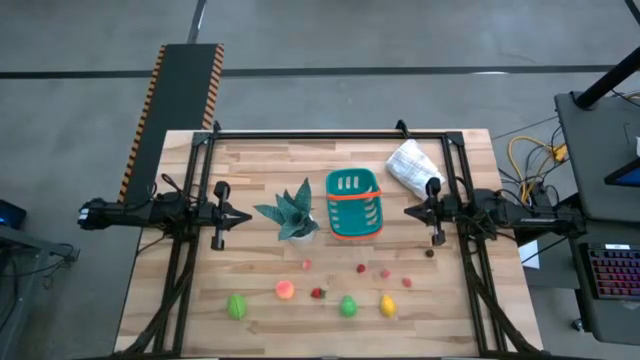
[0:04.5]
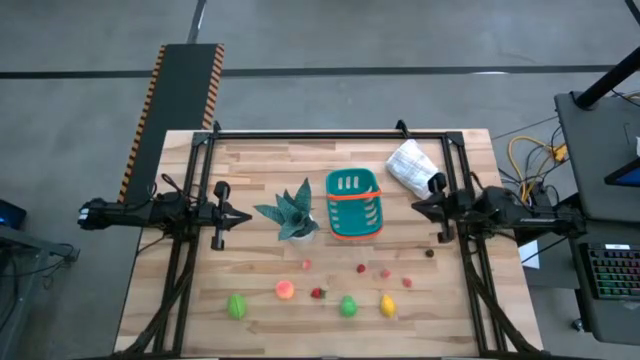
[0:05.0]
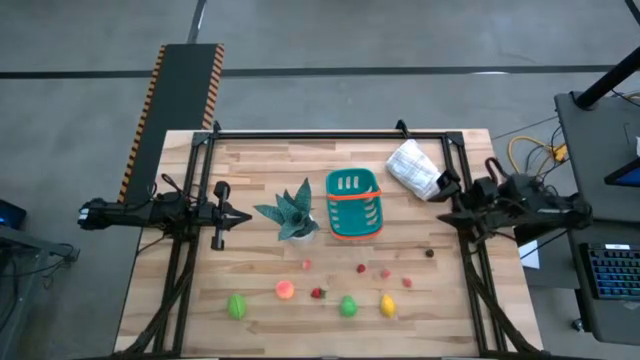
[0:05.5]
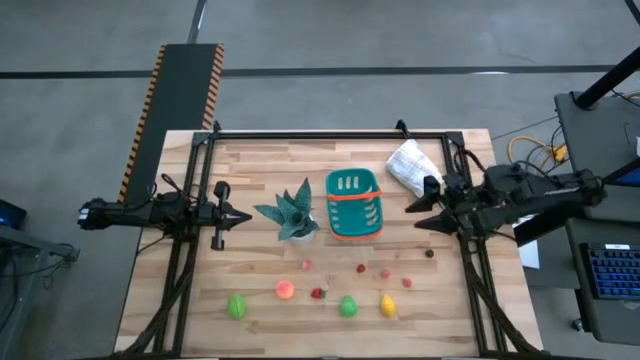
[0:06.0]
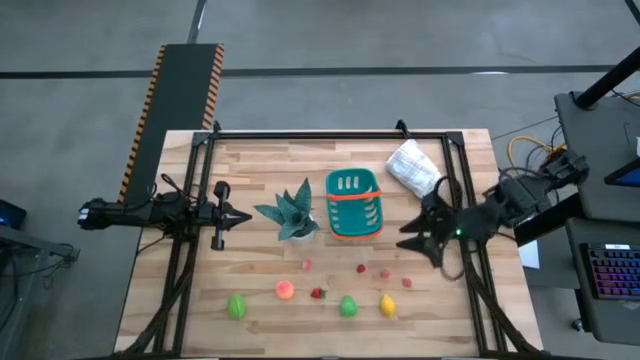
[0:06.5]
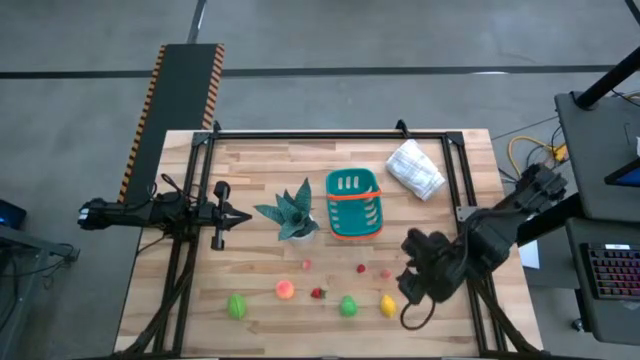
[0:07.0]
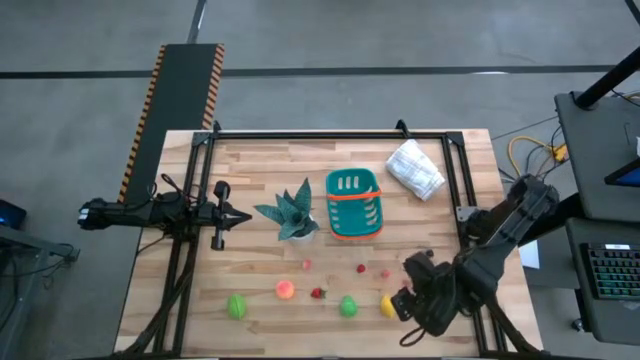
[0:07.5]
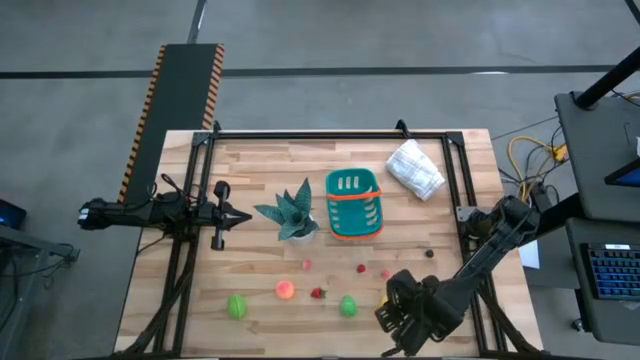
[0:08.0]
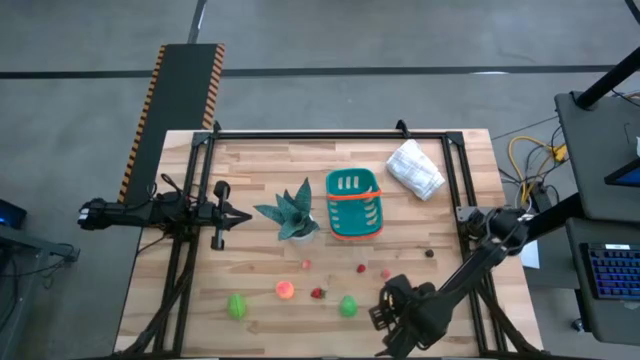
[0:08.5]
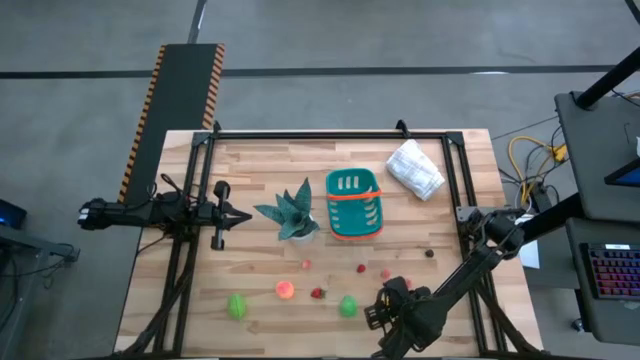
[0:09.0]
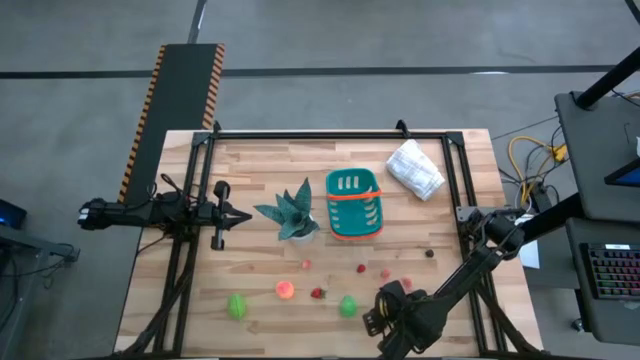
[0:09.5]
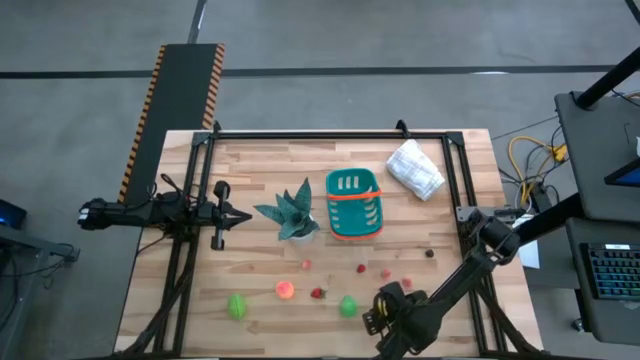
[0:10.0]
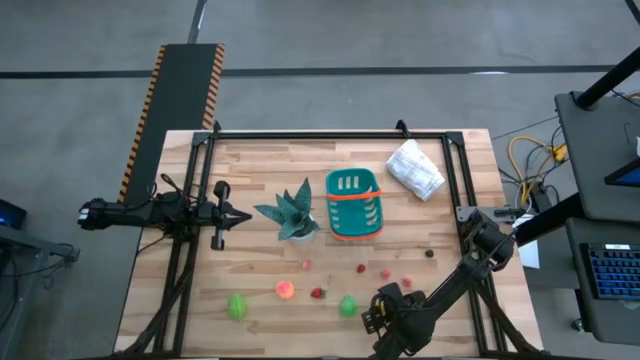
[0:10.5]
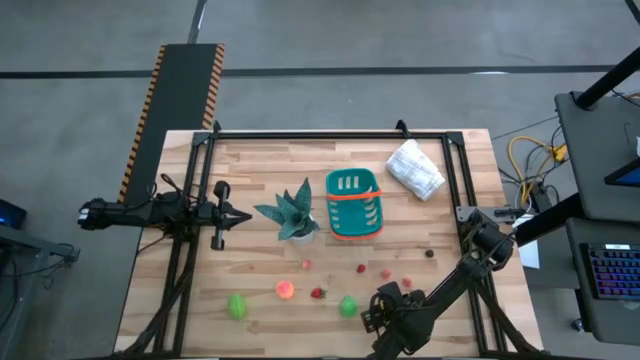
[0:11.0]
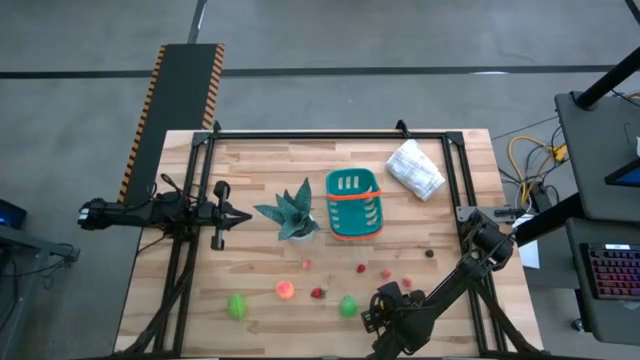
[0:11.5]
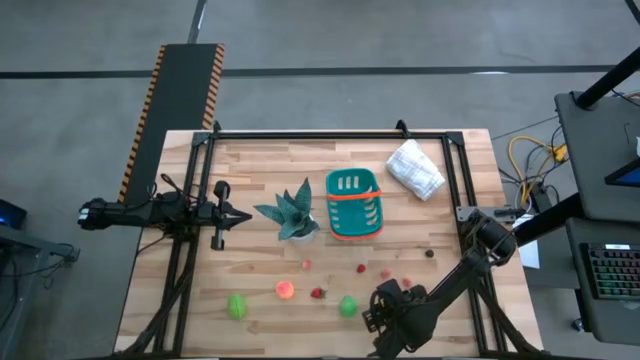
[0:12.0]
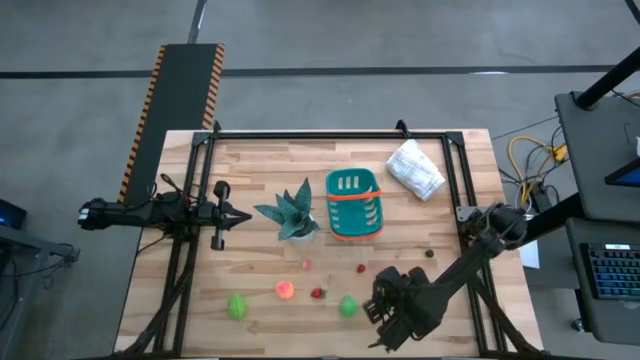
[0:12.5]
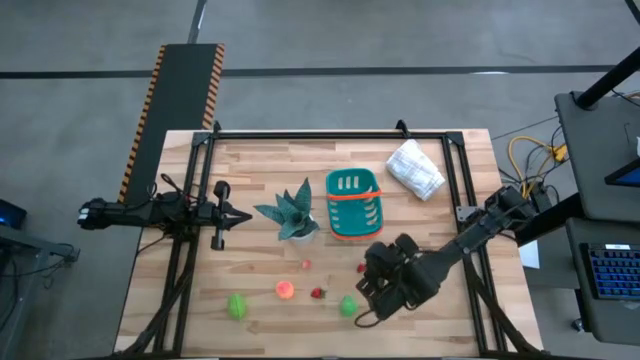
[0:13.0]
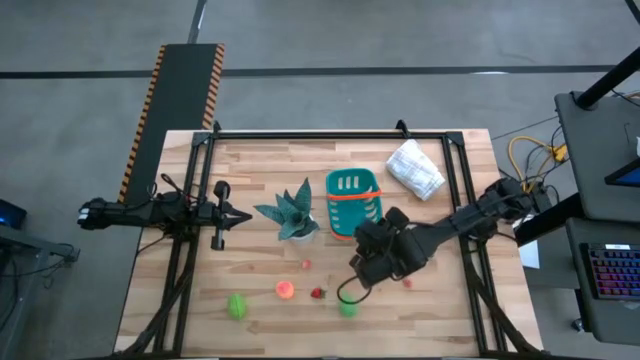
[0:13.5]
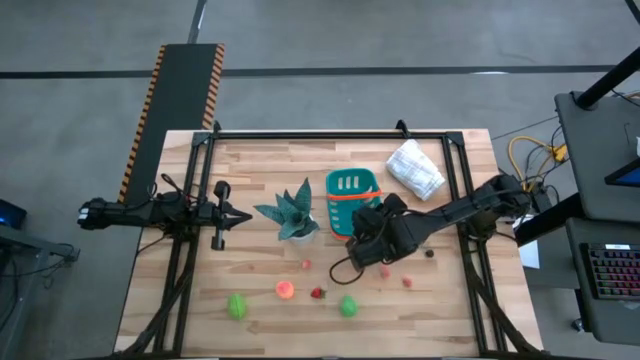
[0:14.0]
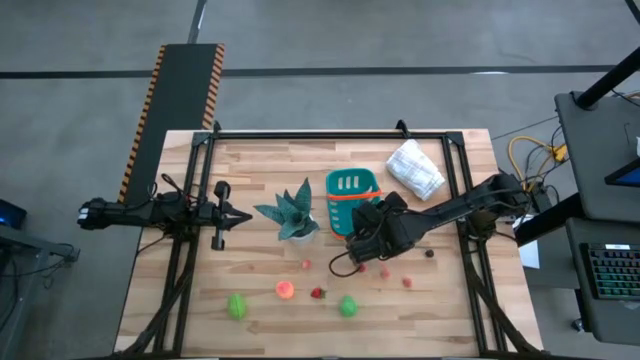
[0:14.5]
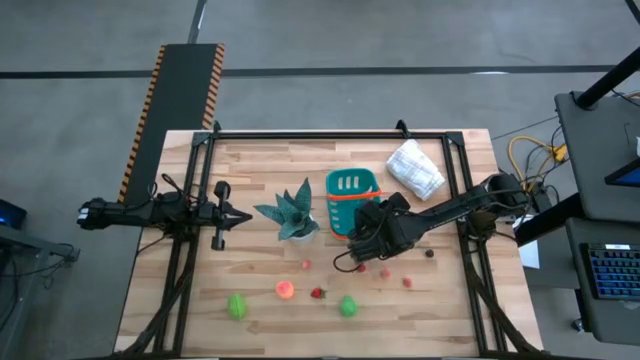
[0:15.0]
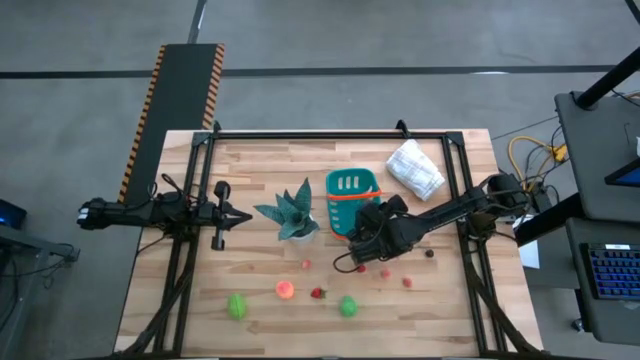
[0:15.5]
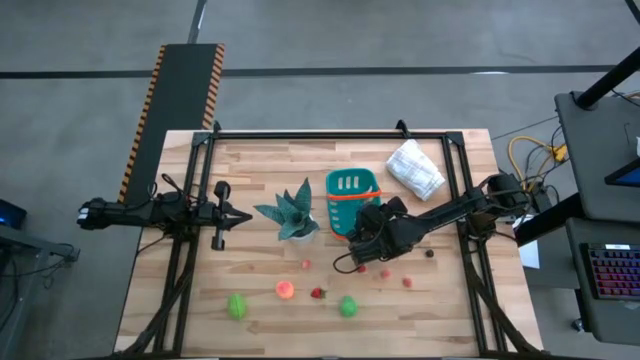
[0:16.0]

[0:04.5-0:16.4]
Task: Build produce basket
Put the lemon into the basket

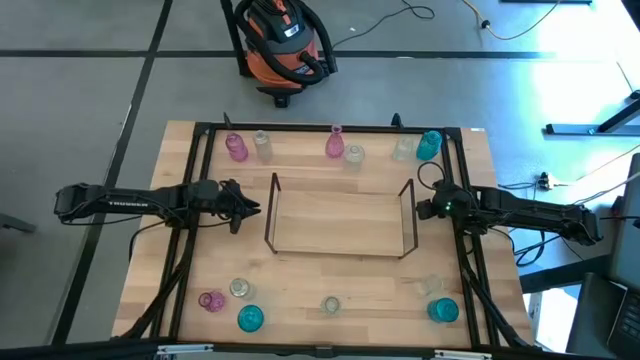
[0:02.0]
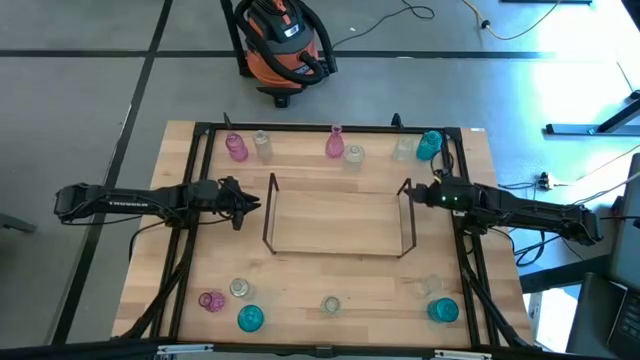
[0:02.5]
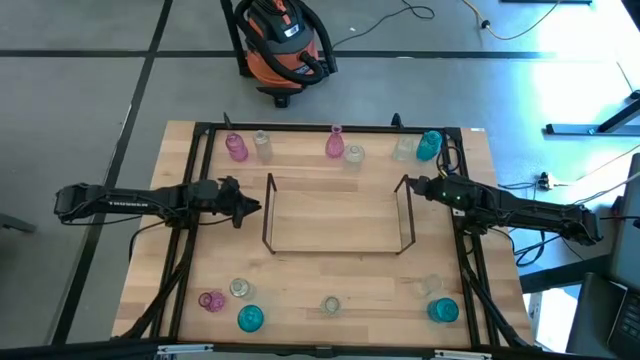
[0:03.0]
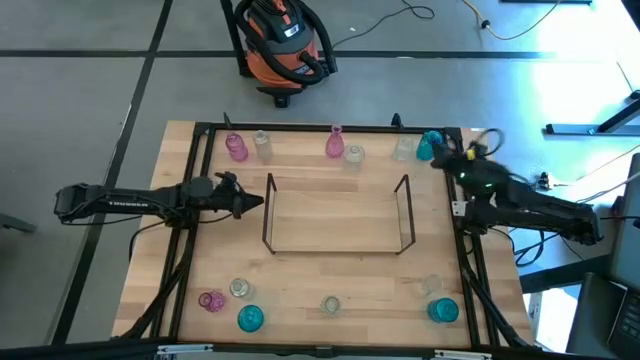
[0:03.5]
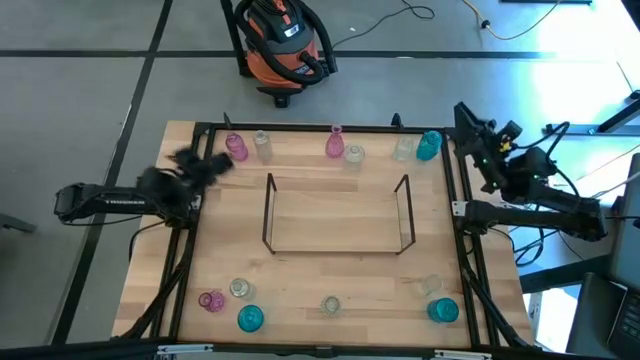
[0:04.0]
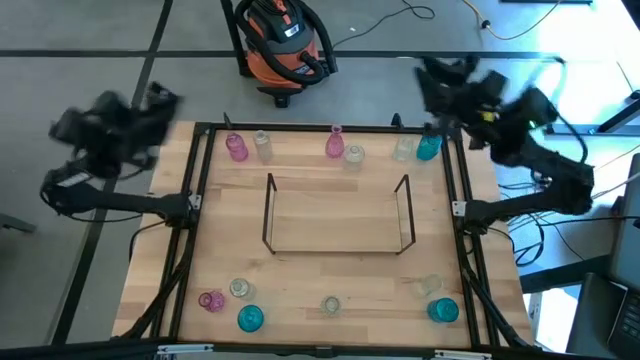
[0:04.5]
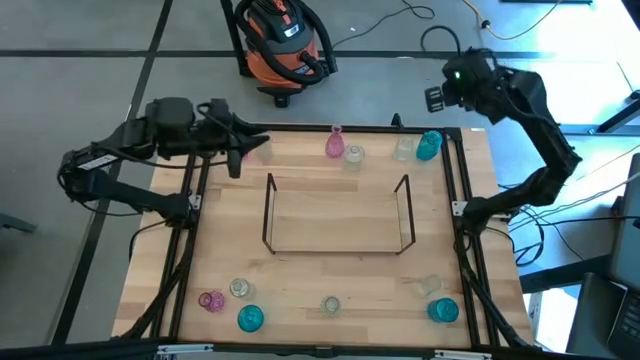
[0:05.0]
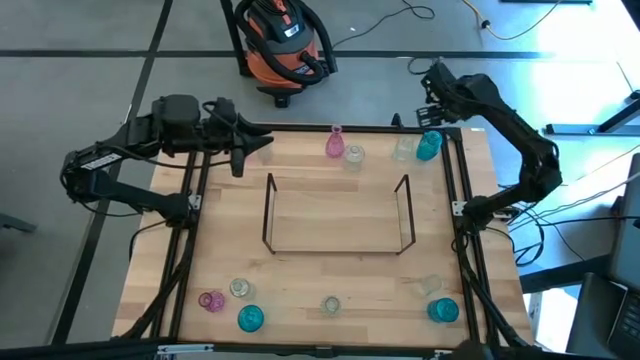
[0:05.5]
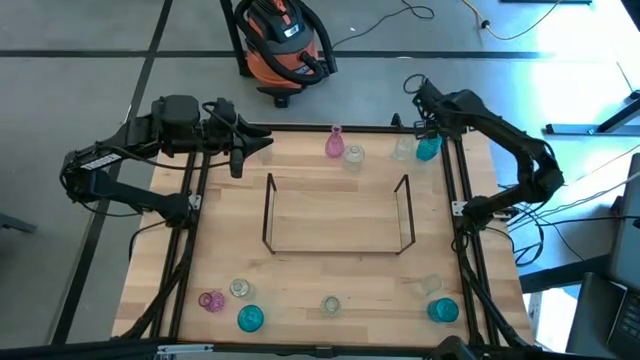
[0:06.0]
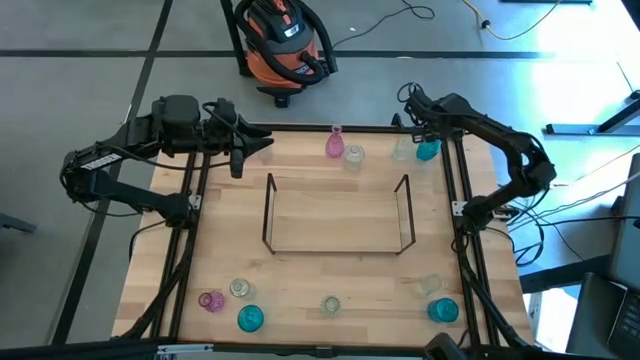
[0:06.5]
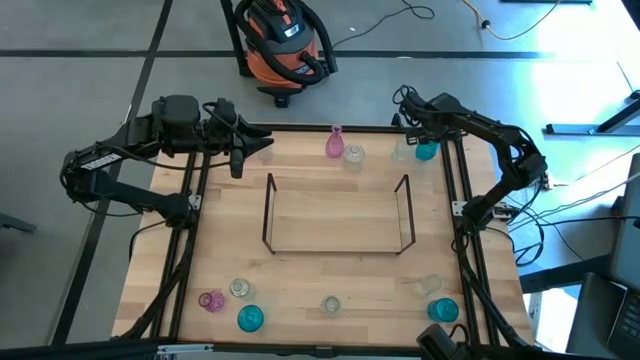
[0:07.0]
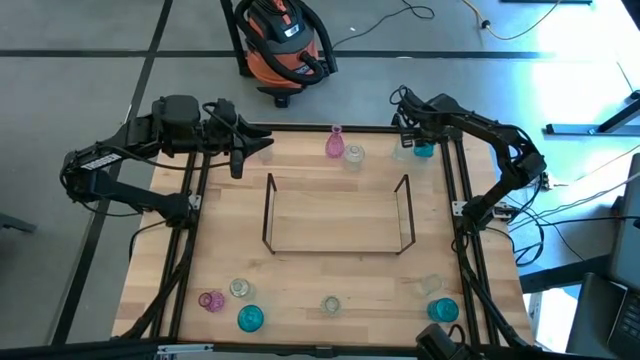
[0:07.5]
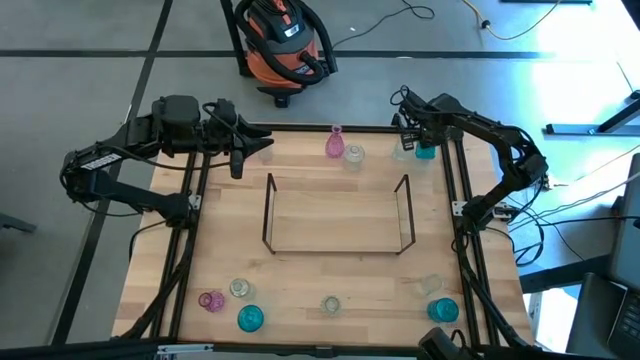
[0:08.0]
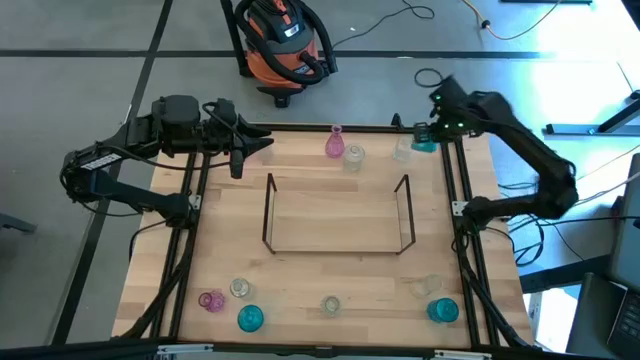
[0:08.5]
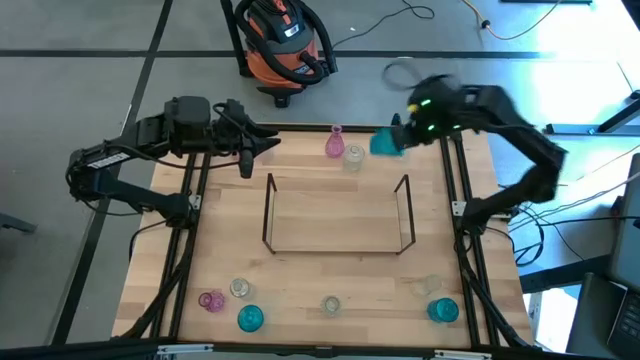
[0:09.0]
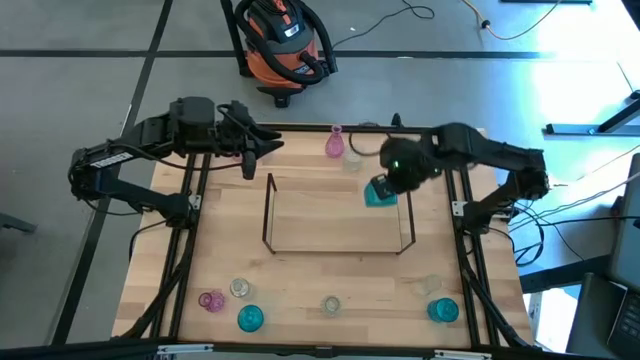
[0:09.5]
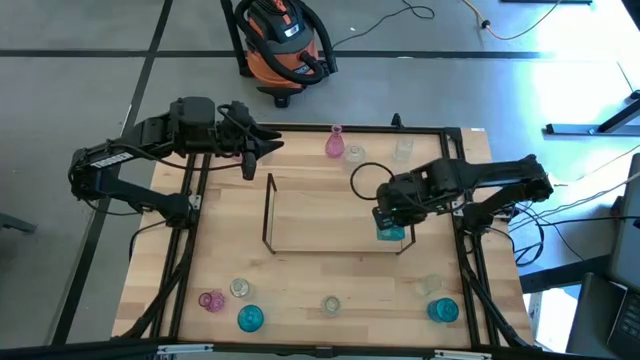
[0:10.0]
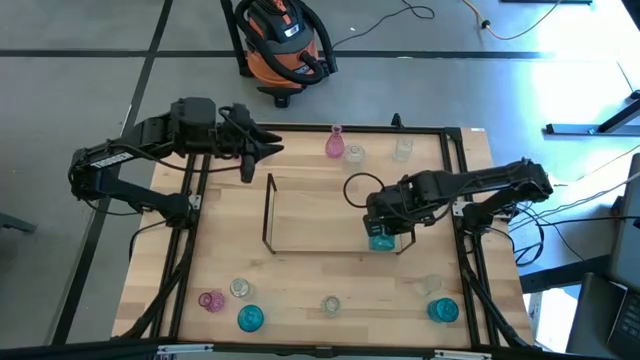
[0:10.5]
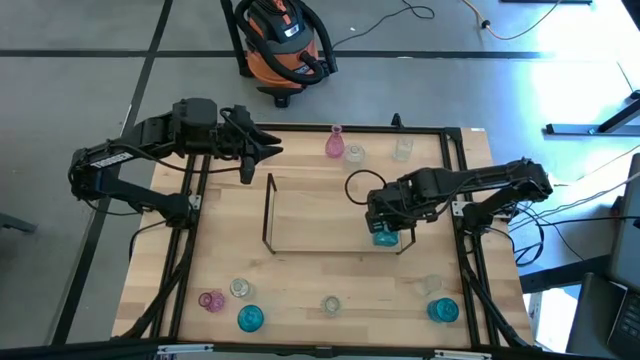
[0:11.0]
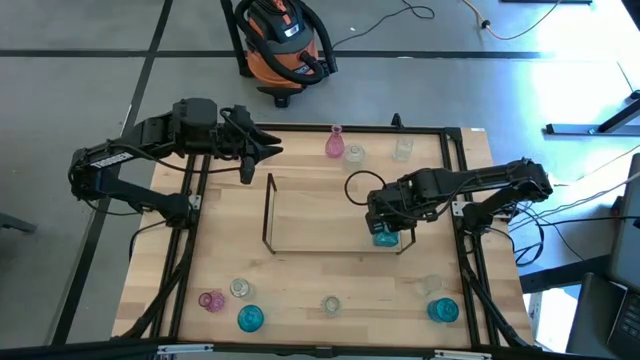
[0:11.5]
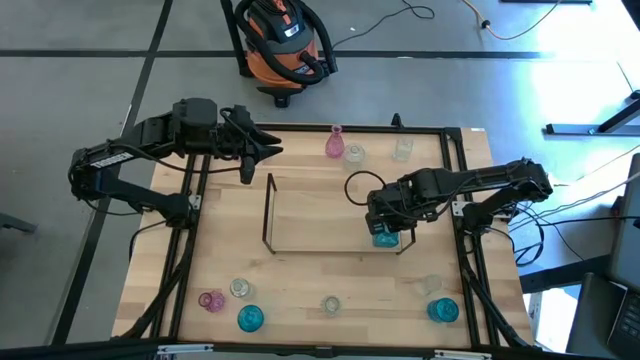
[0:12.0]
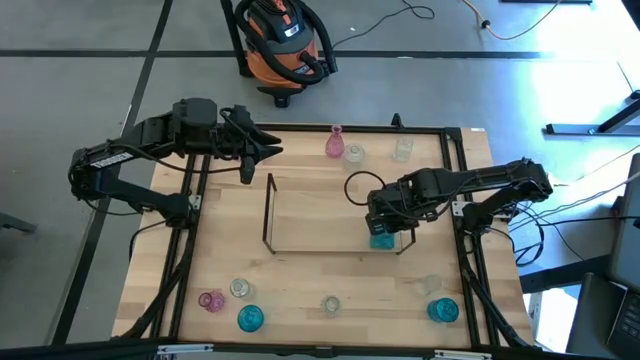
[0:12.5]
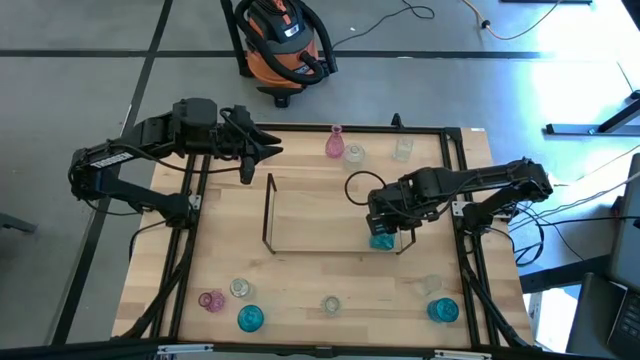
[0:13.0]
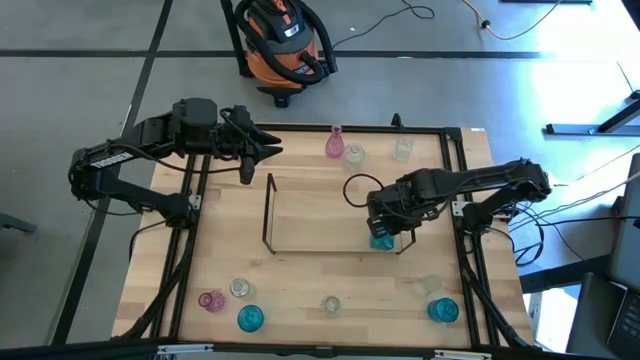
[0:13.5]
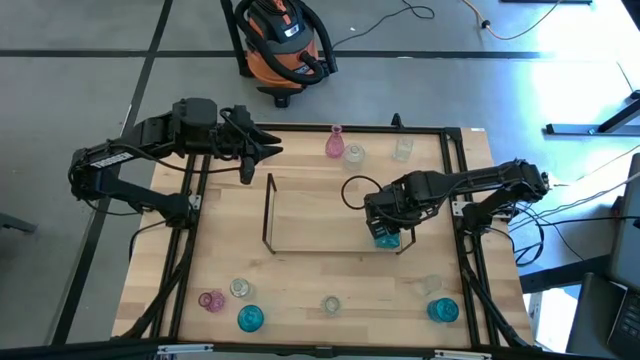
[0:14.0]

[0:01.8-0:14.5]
Task: sort vases onto shelf
Put the blue vase on the shelf
